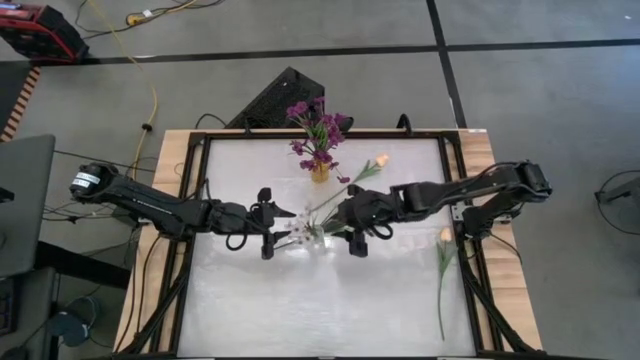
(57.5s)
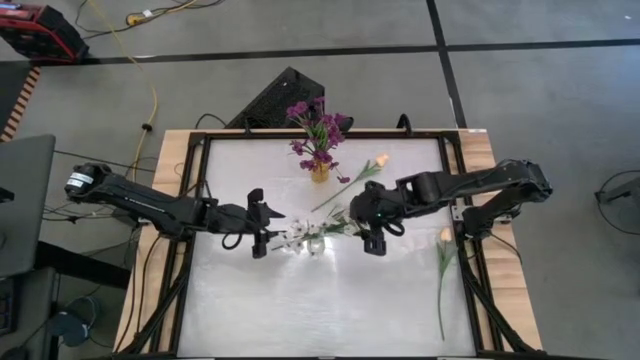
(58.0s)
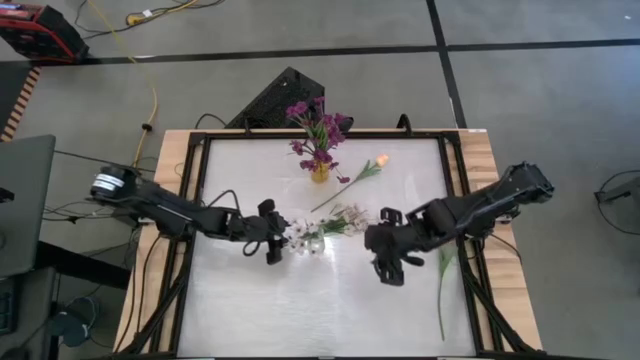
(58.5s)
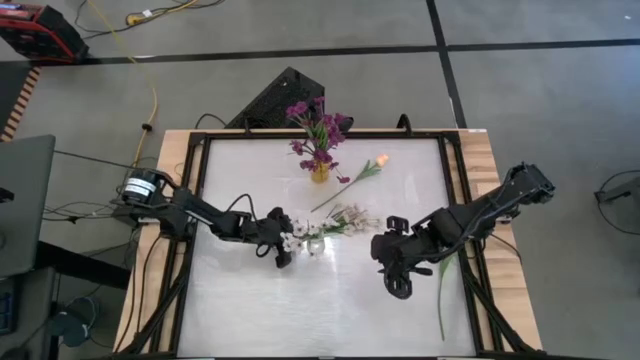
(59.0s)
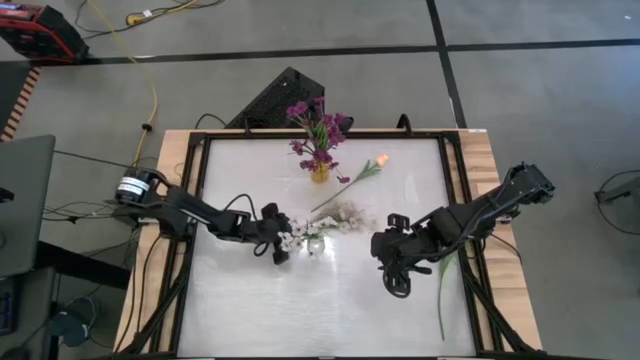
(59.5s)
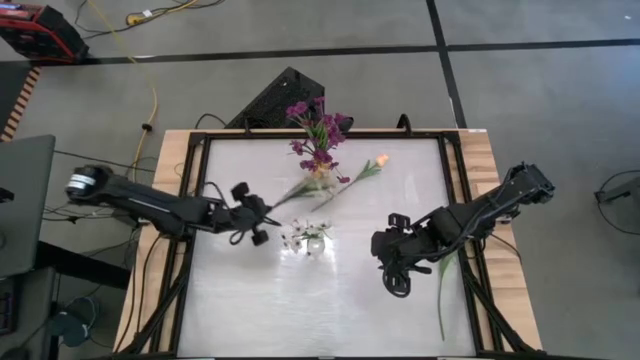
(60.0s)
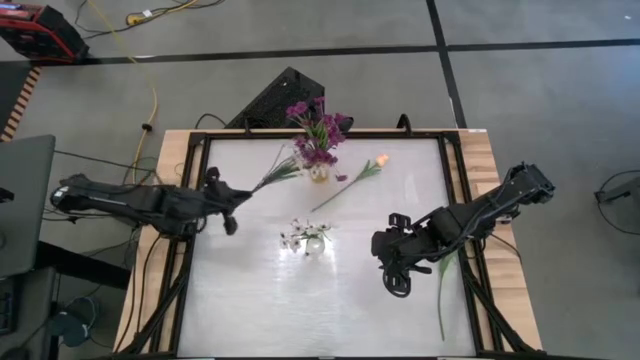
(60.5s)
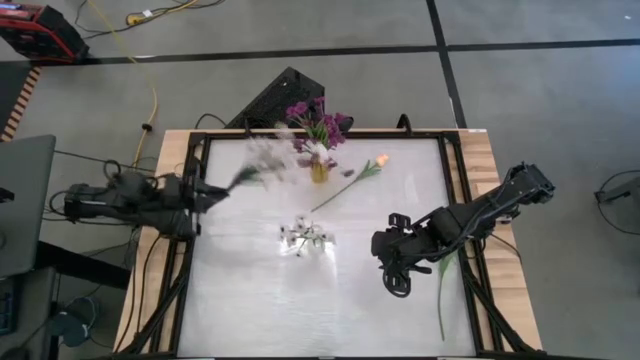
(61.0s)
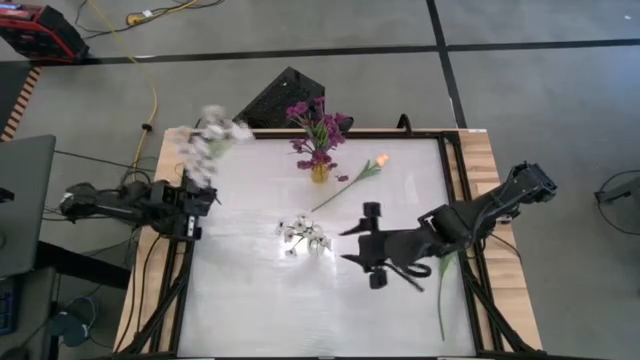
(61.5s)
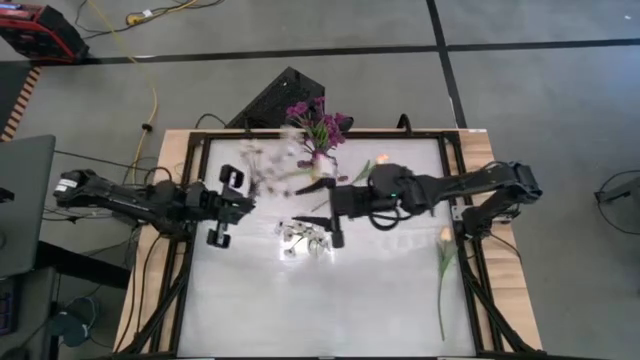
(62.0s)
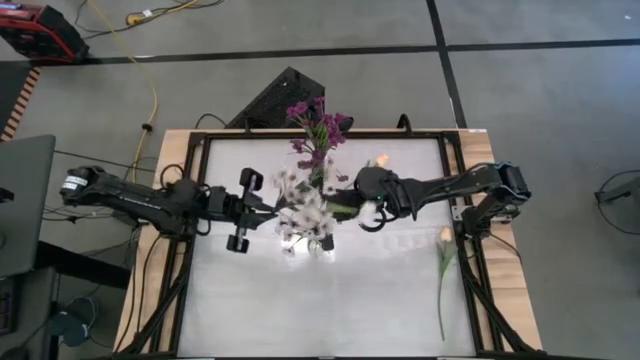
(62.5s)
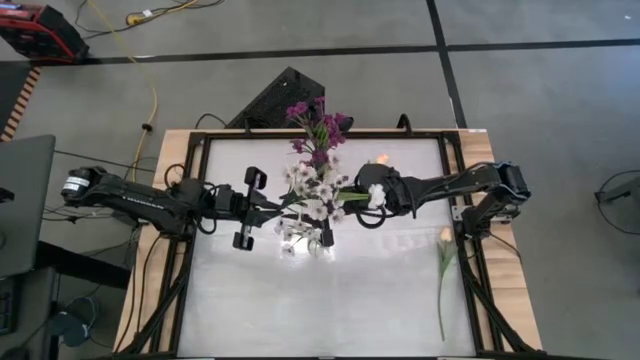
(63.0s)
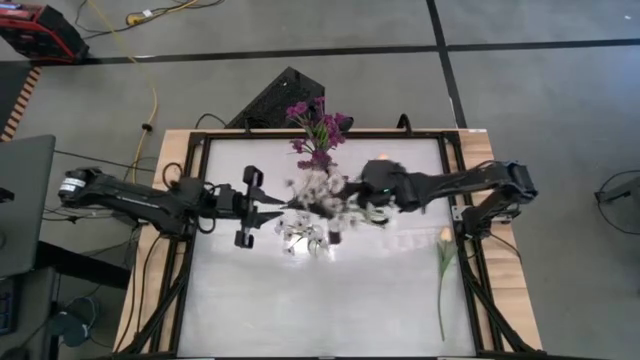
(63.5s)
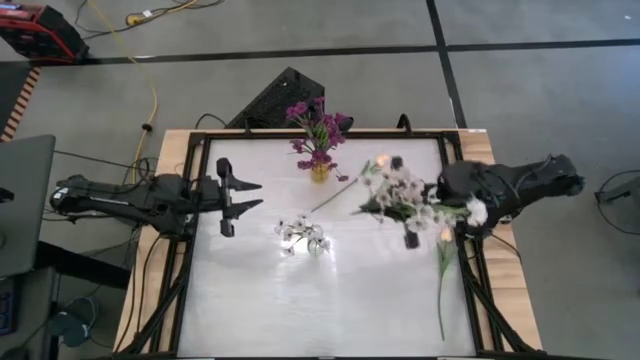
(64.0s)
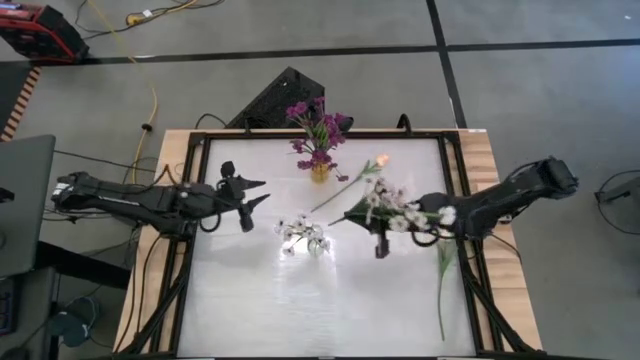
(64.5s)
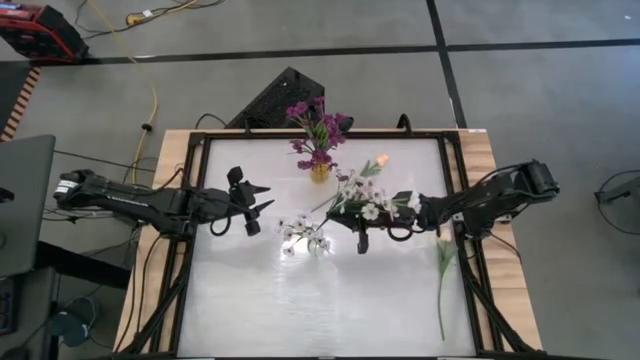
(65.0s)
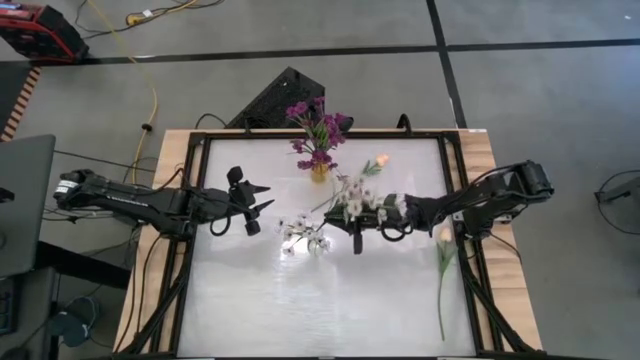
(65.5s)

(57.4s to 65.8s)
Task: Sort flowers into vase by color
Put the white flowers into the transparent vase

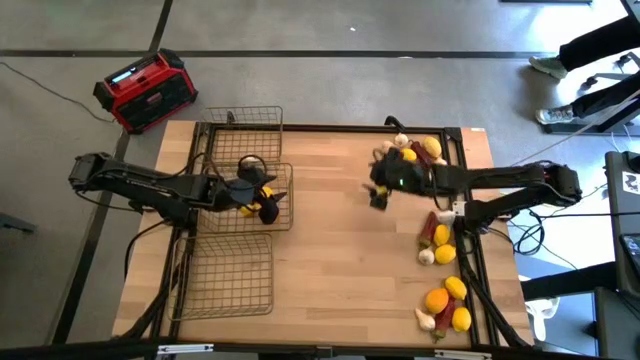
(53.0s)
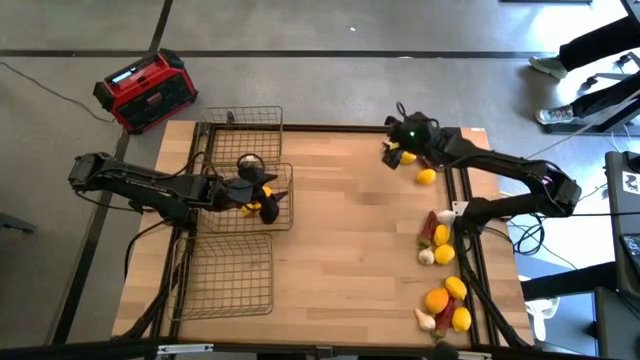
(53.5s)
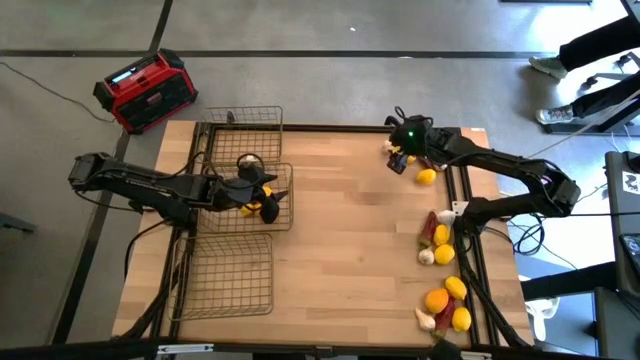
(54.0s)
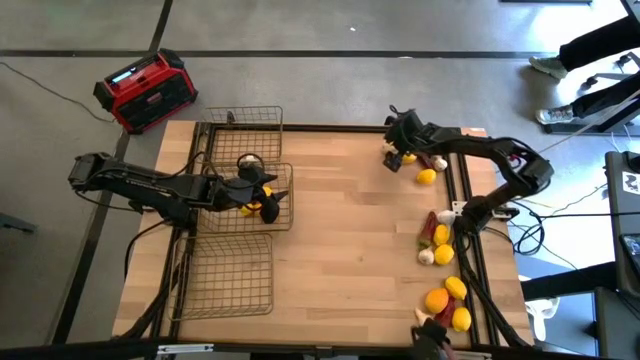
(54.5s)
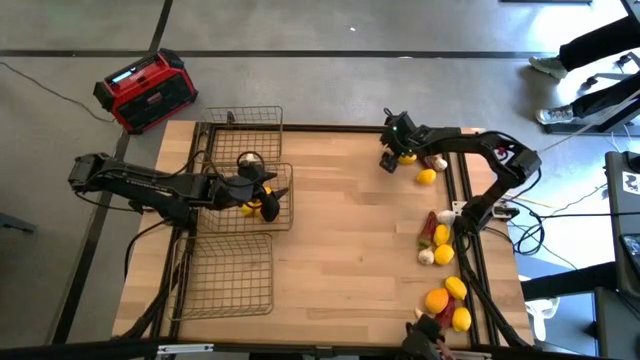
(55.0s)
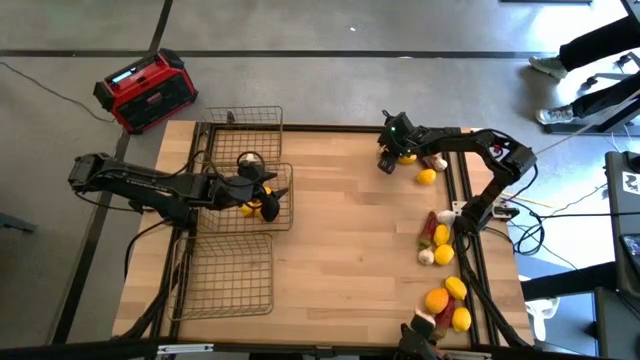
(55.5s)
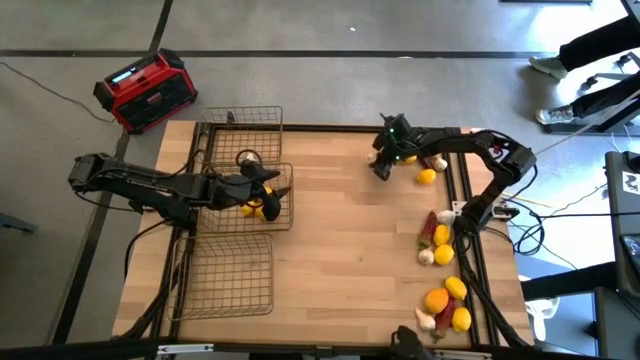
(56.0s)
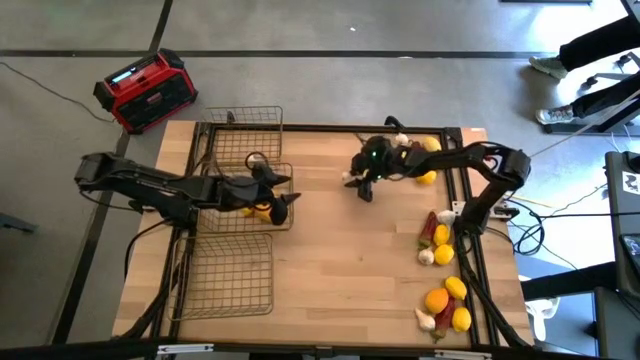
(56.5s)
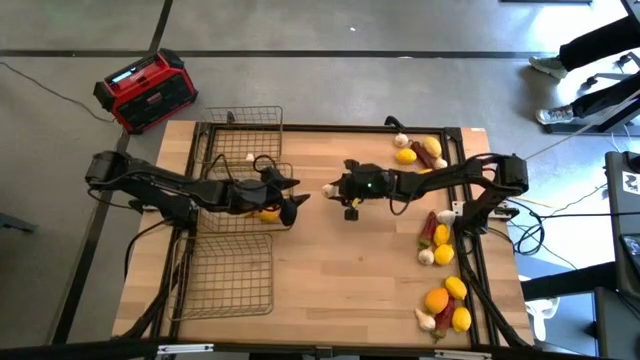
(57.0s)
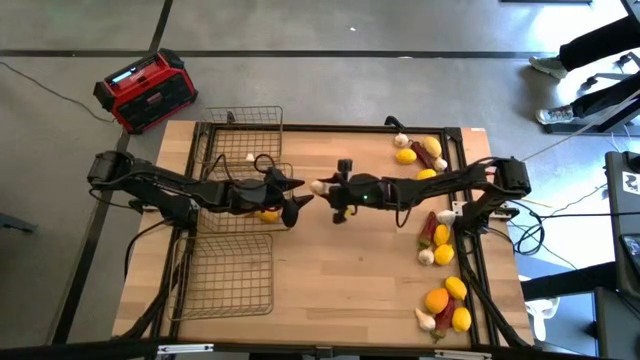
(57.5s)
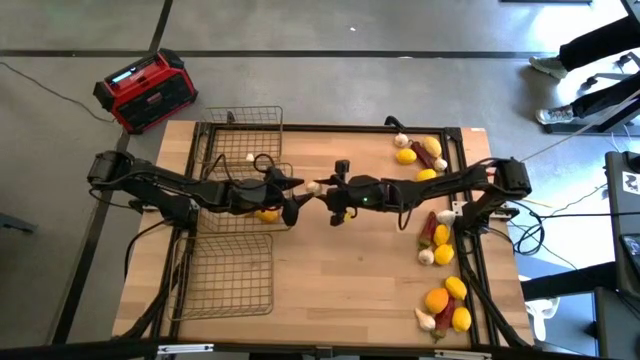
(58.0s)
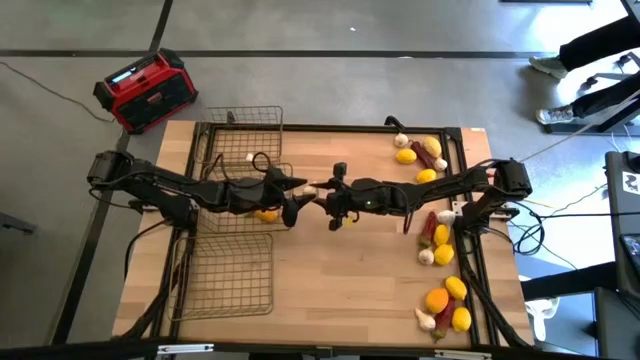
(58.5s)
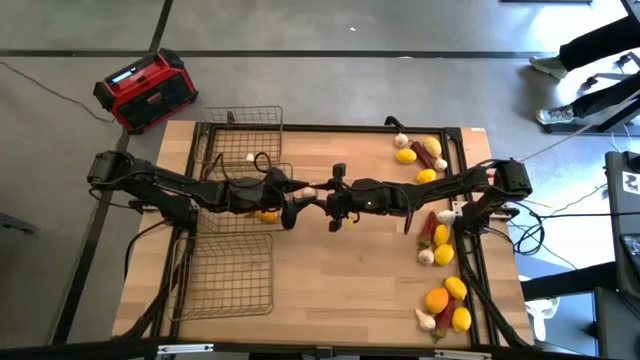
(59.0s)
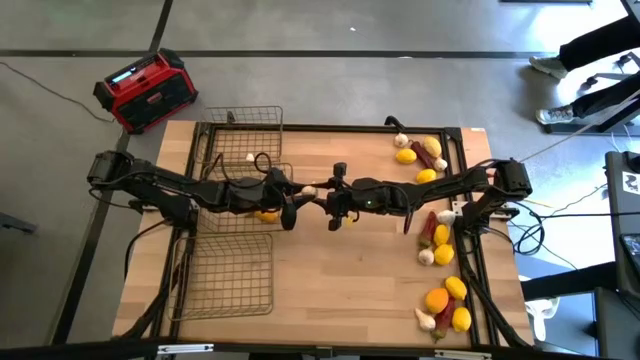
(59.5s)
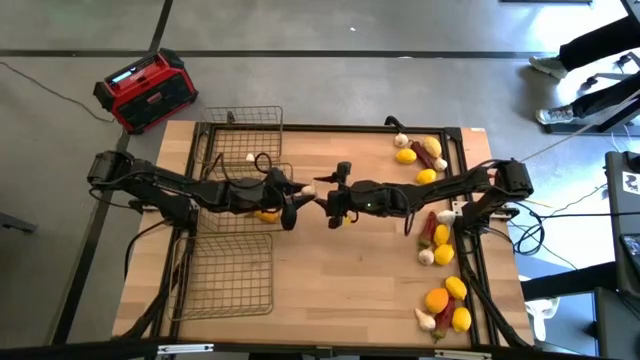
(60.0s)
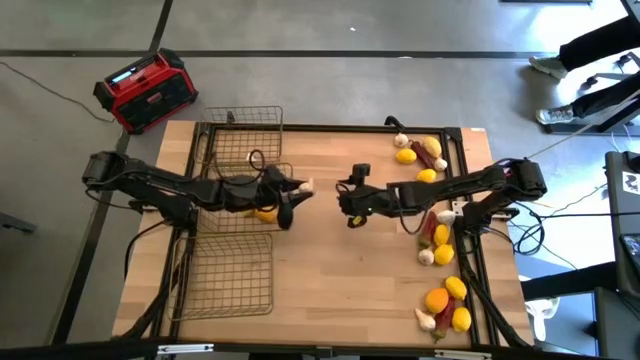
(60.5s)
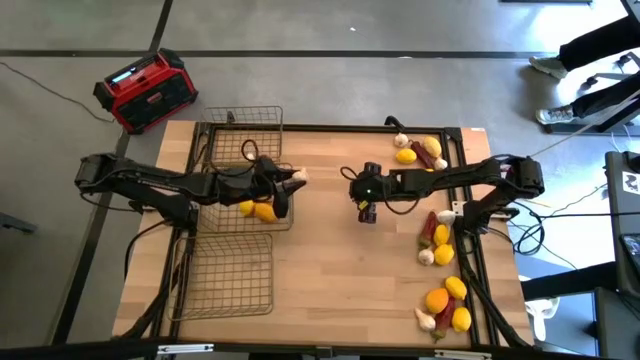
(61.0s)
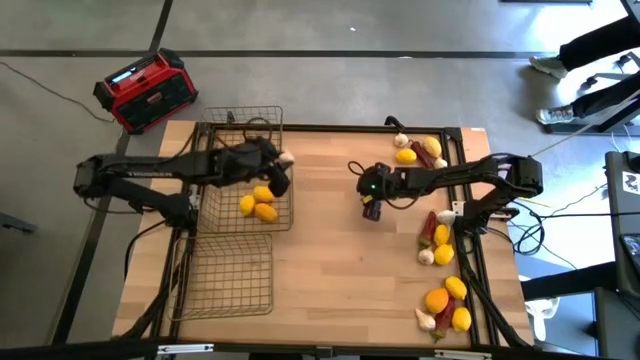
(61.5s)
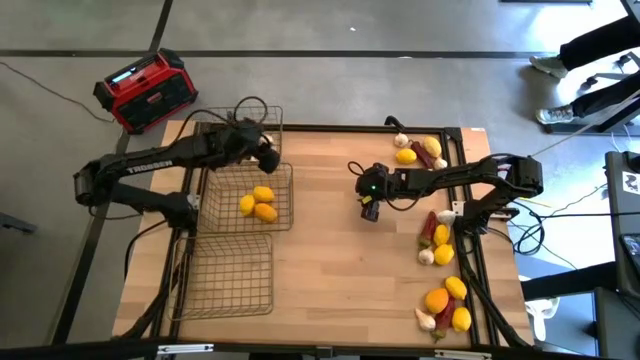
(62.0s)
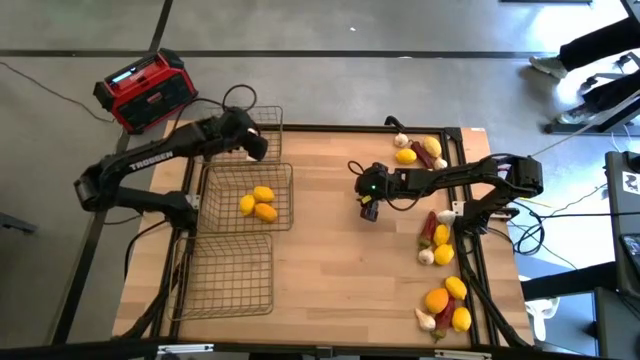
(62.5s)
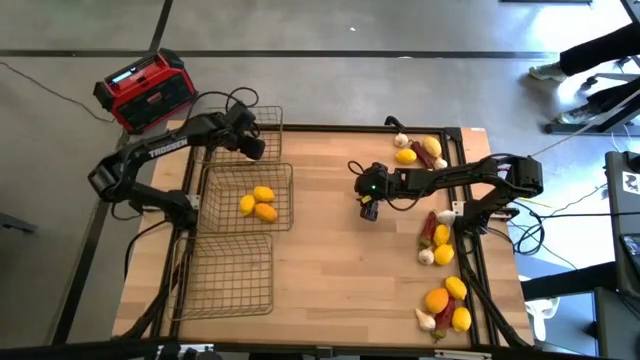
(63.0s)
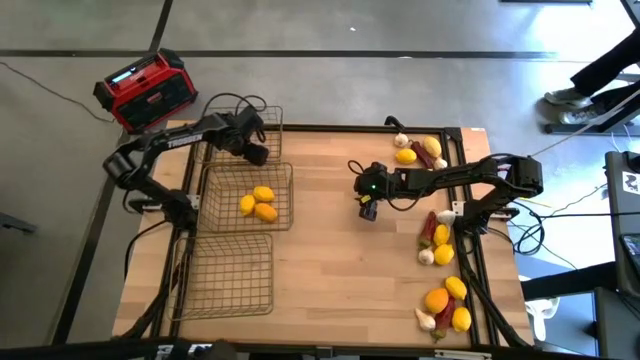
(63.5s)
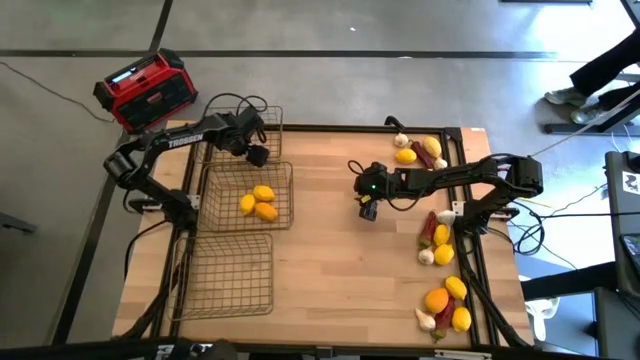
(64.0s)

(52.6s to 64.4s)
Task: Sort produce into baskets
Put the garlic in the top wire basket
